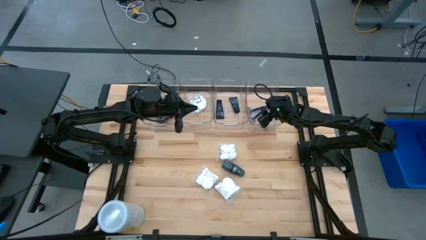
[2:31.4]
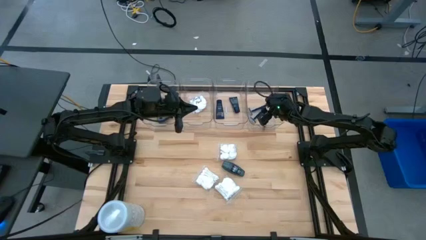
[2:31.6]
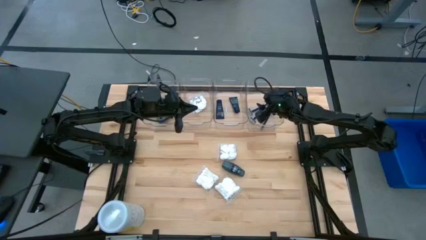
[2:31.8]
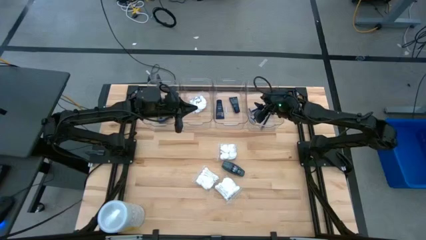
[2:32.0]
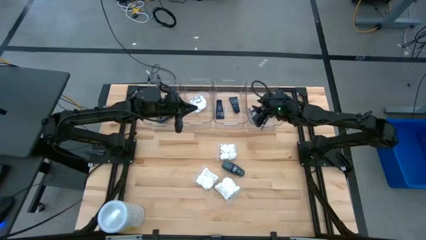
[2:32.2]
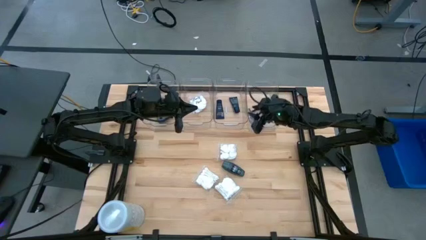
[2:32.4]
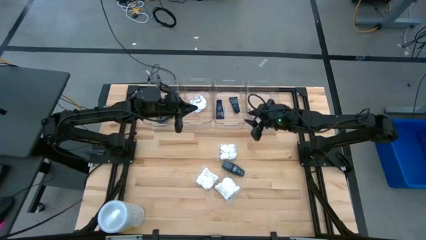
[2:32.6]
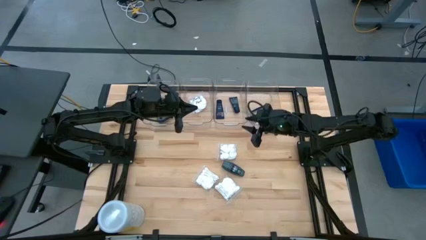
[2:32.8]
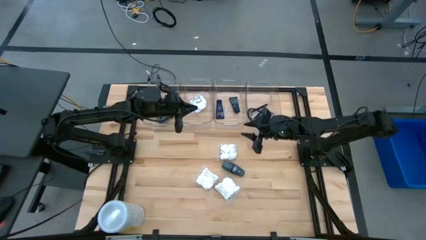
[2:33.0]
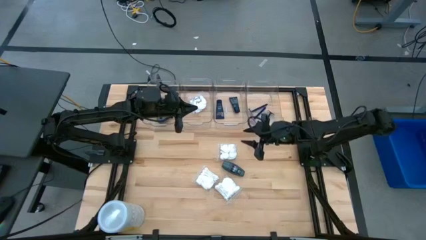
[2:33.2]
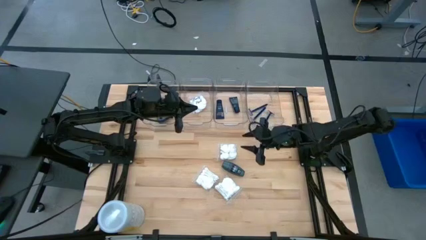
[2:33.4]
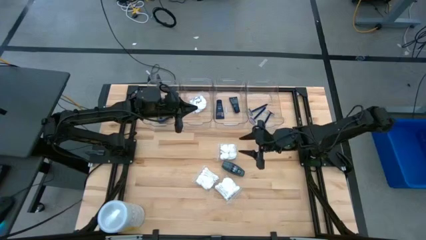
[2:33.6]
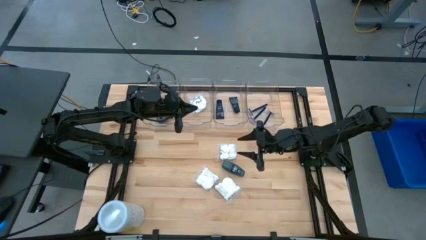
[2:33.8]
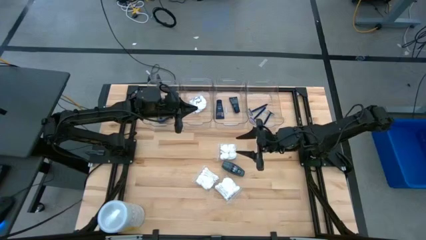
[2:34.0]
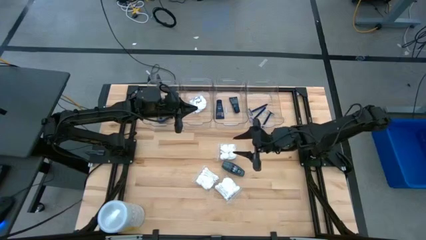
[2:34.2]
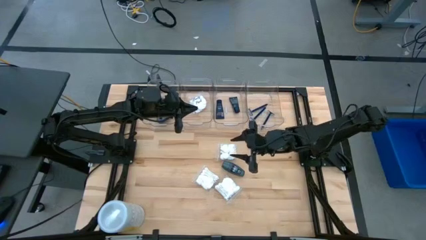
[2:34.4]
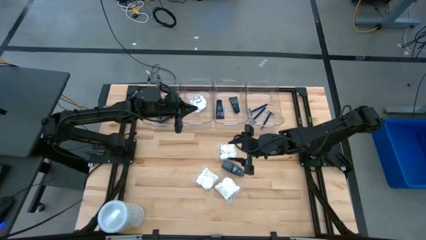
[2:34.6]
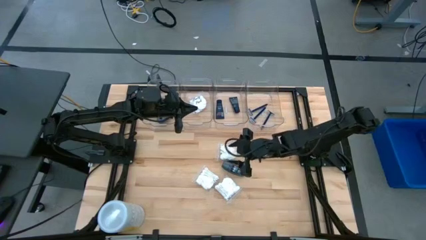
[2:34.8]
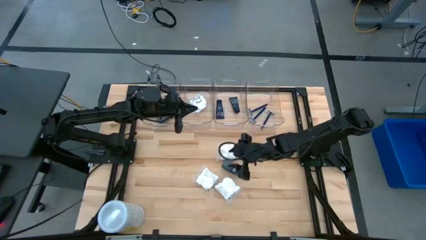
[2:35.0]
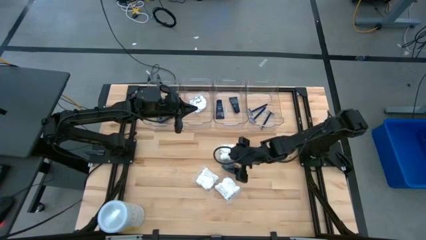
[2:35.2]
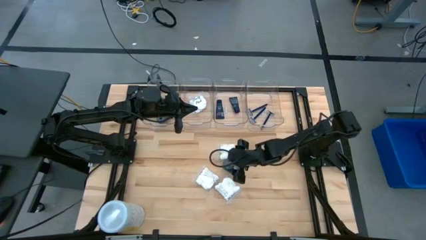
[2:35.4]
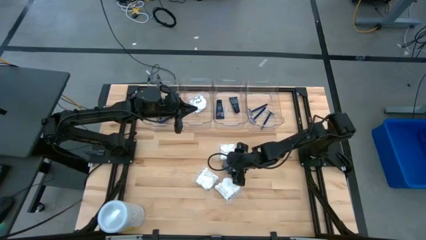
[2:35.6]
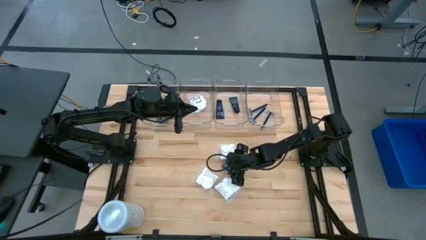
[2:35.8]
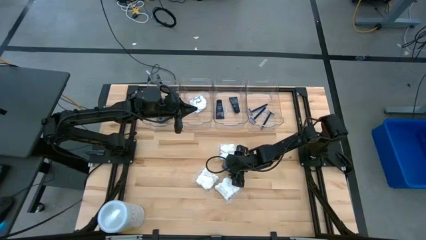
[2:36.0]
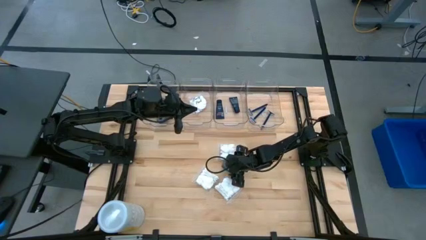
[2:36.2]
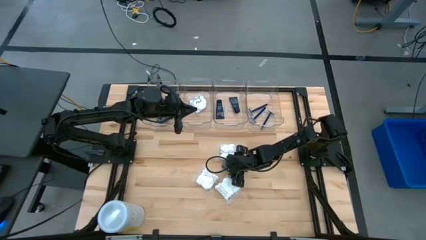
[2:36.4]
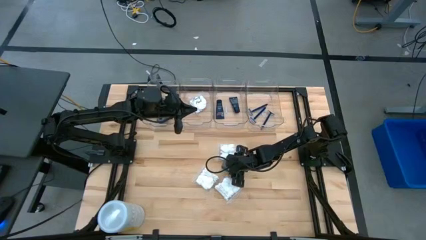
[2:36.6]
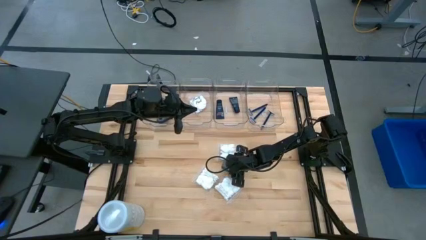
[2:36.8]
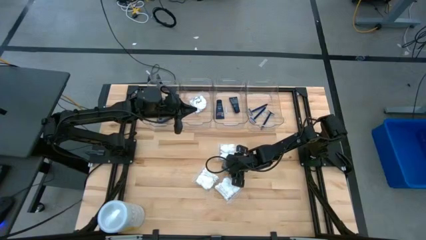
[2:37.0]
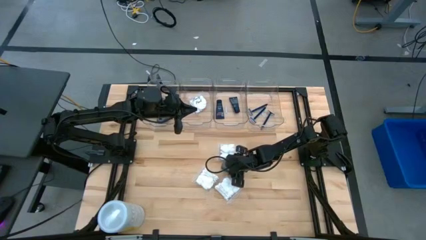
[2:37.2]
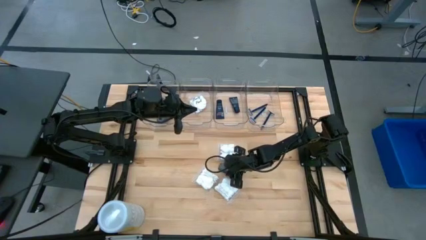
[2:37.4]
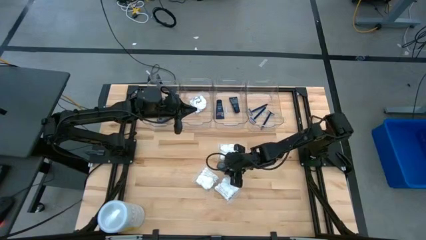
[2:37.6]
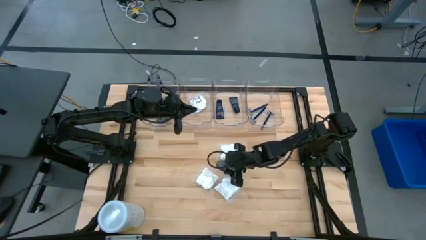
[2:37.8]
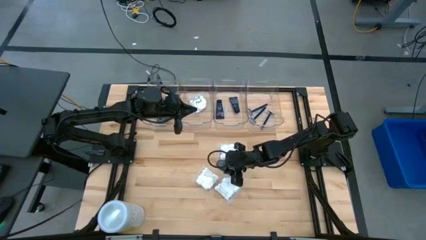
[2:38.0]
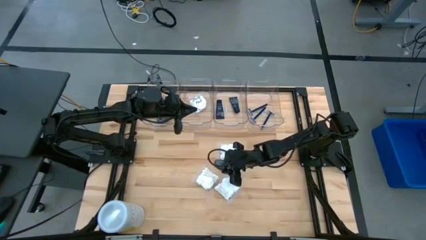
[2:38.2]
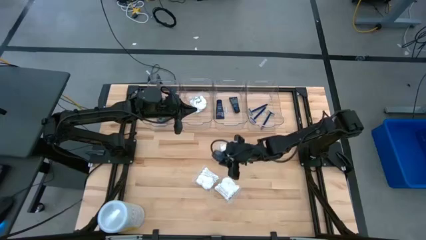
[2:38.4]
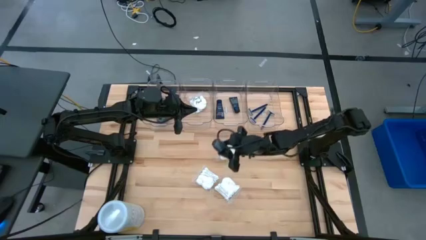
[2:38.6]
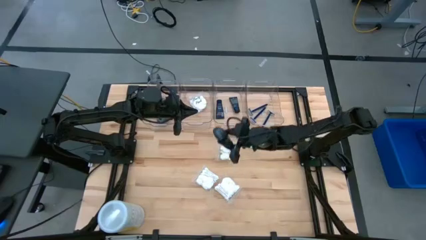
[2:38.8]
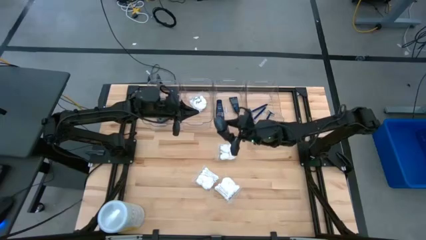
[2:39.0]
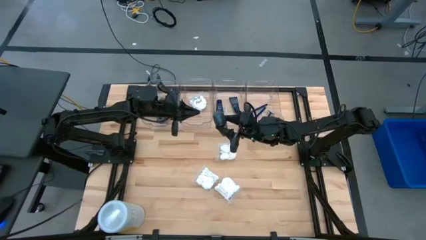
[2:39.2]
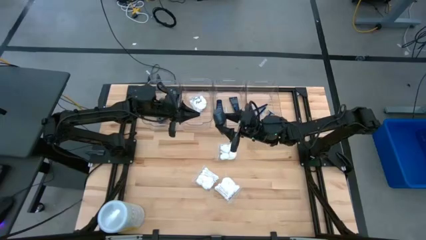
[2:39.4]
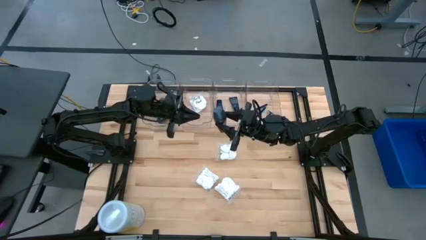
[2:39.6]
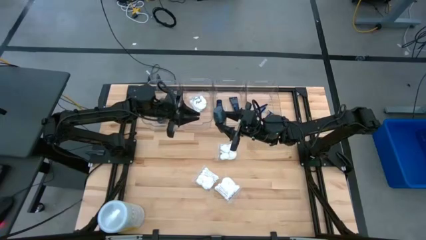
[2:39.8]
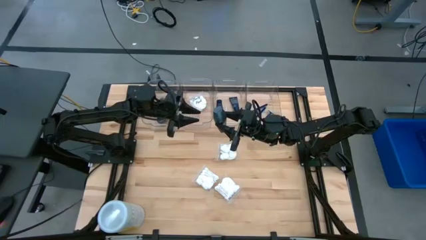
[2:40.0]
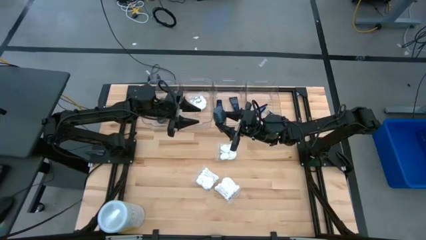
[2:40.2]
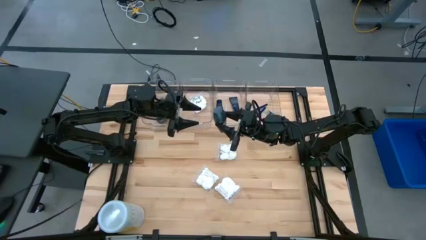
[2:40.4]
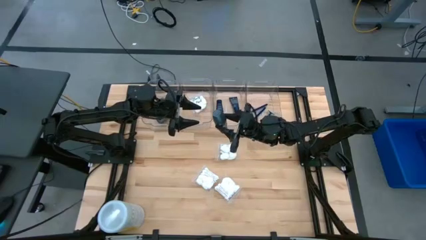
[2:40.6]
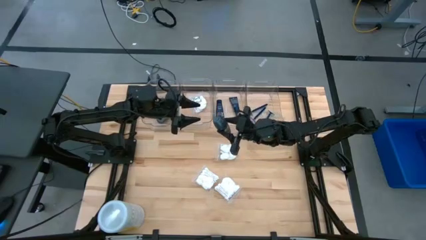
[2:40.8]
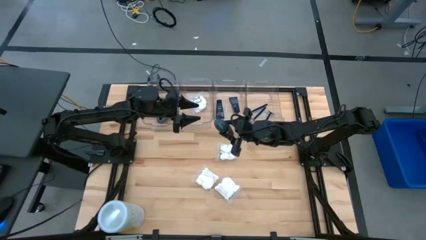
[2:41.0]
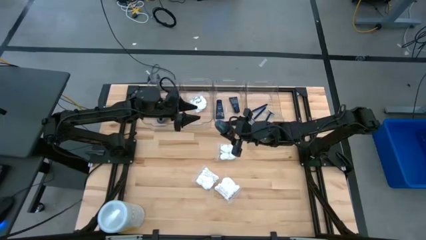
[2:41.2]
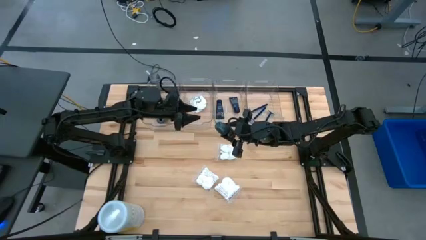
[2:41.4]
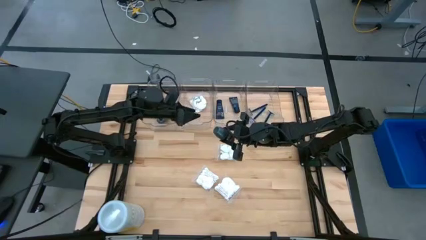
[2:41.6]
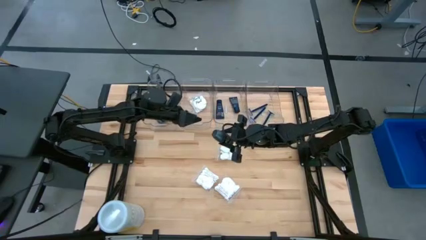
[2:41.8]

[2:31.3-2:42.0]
Task: Pick & Place Travel size toiletries
Put the gray deodorant into the left transparent bin

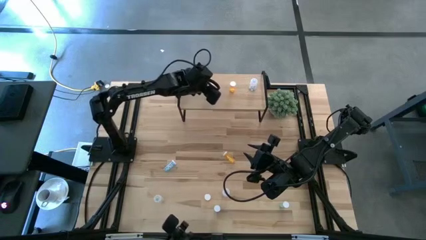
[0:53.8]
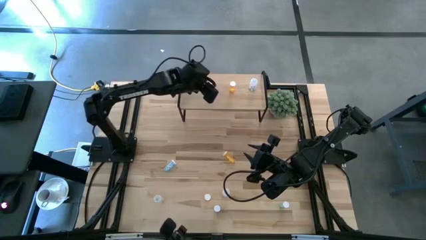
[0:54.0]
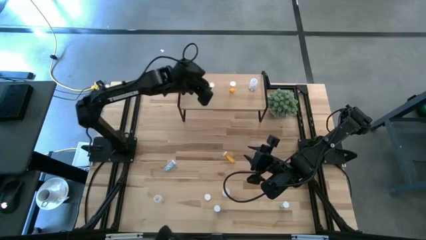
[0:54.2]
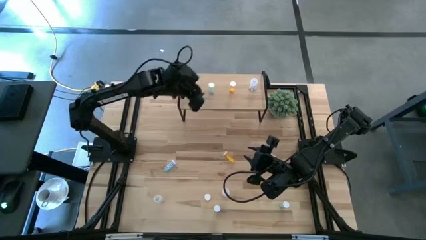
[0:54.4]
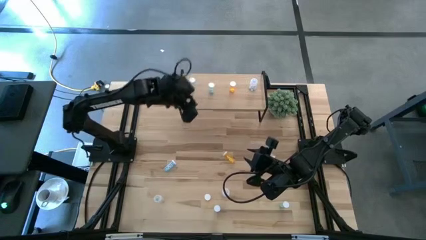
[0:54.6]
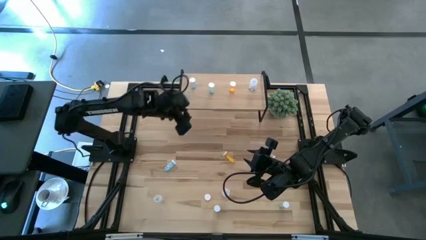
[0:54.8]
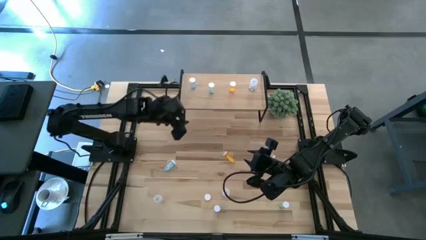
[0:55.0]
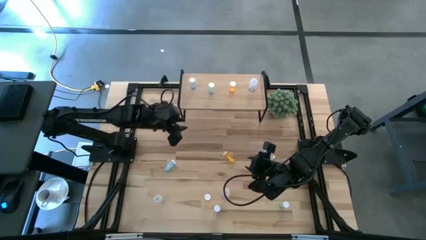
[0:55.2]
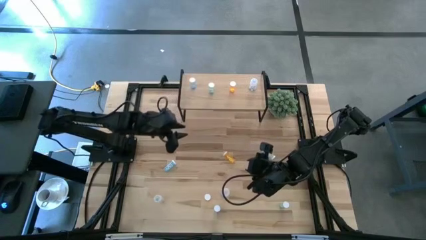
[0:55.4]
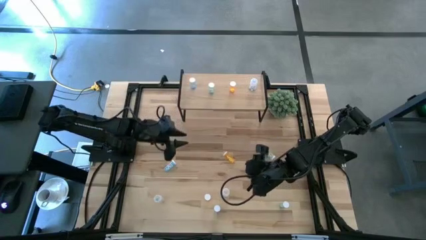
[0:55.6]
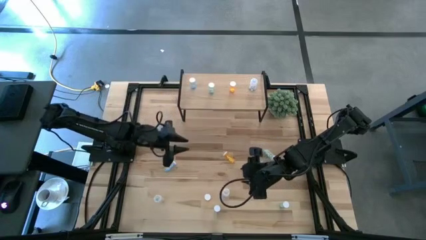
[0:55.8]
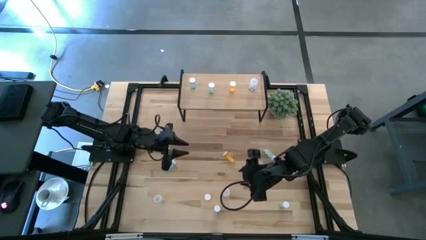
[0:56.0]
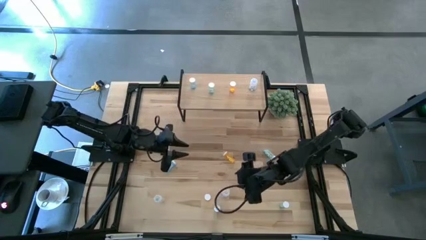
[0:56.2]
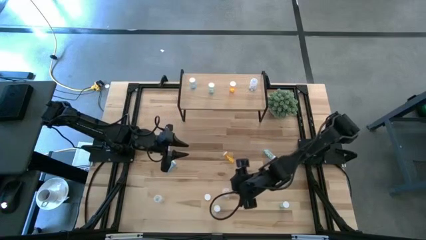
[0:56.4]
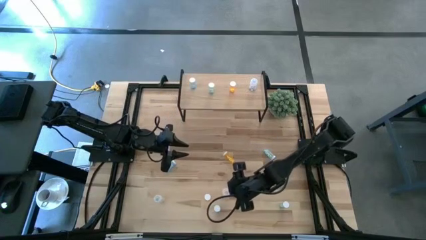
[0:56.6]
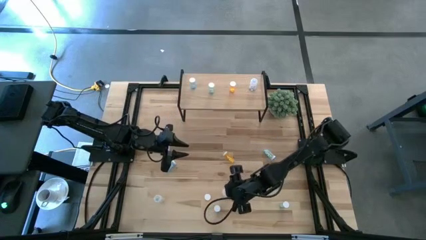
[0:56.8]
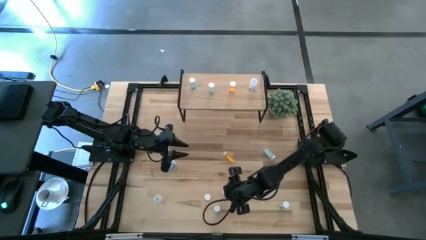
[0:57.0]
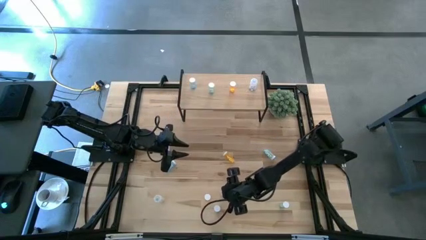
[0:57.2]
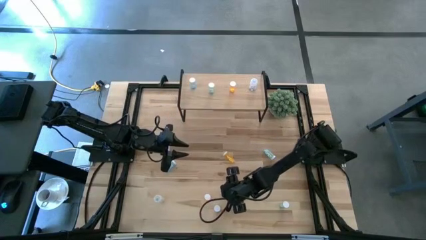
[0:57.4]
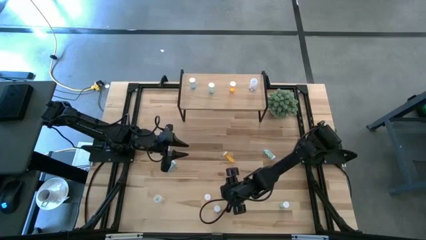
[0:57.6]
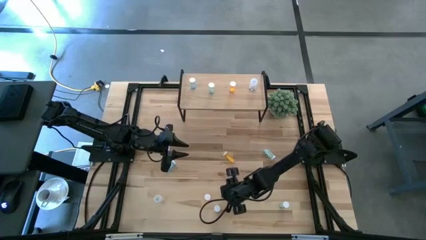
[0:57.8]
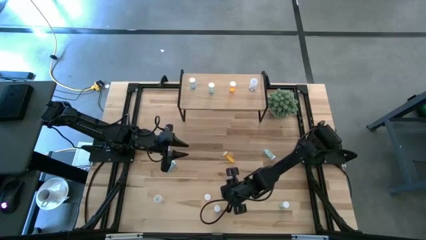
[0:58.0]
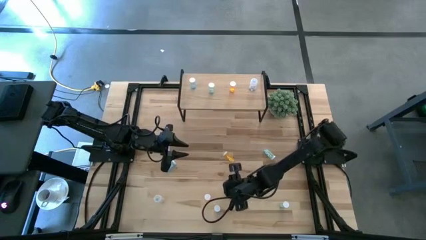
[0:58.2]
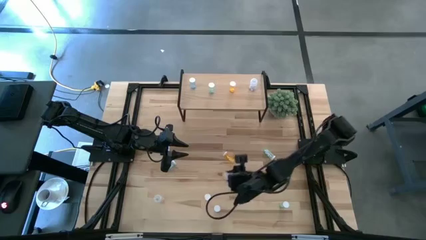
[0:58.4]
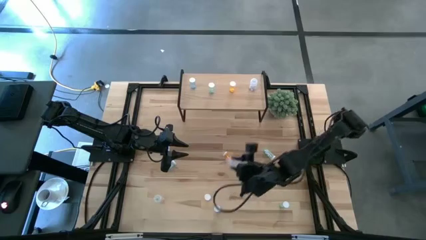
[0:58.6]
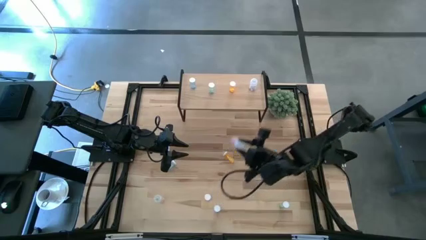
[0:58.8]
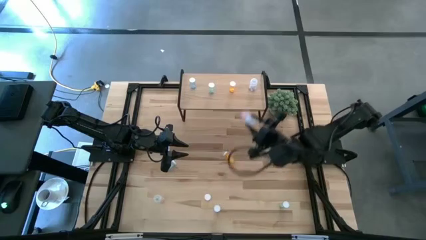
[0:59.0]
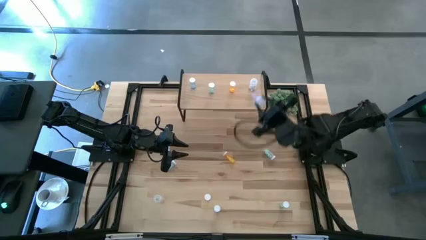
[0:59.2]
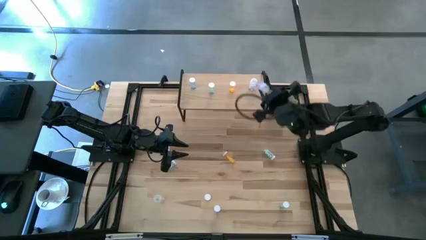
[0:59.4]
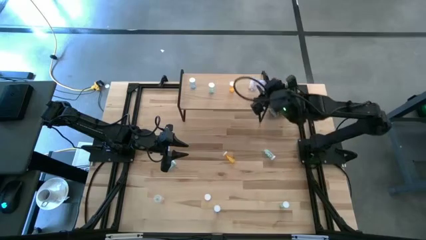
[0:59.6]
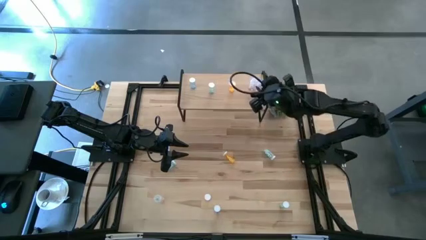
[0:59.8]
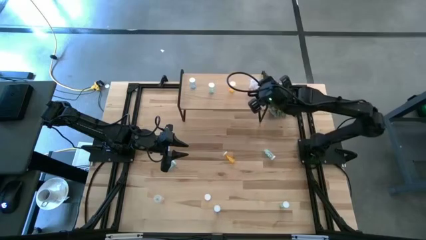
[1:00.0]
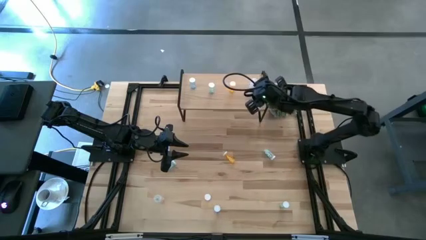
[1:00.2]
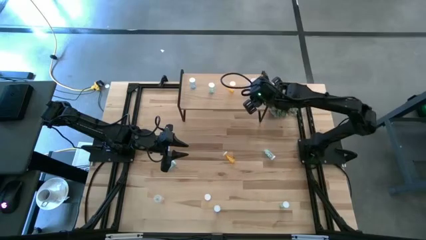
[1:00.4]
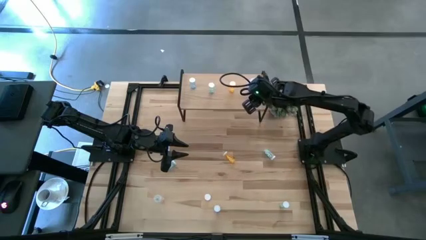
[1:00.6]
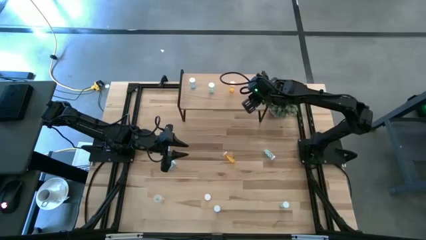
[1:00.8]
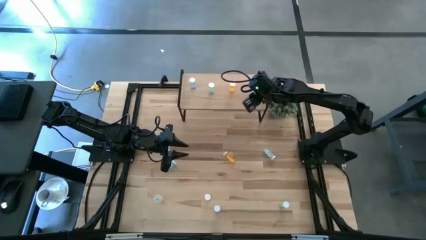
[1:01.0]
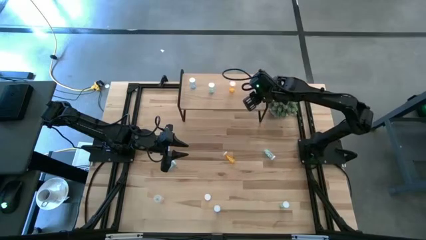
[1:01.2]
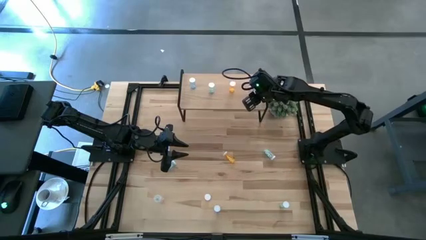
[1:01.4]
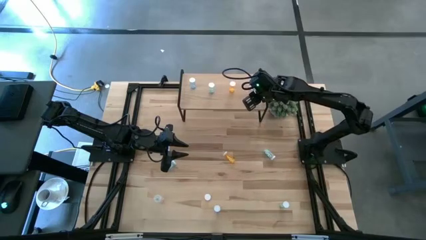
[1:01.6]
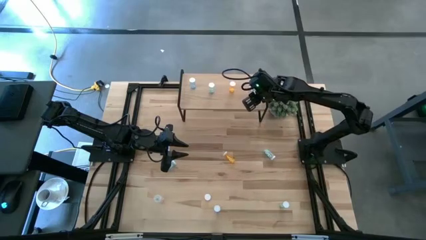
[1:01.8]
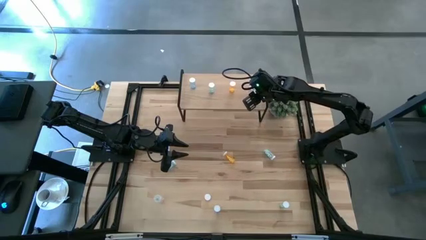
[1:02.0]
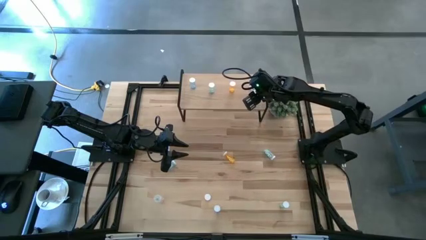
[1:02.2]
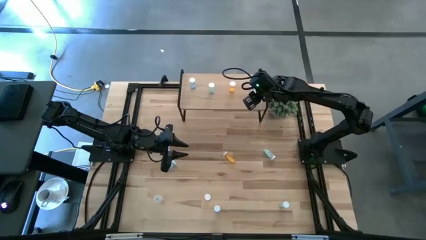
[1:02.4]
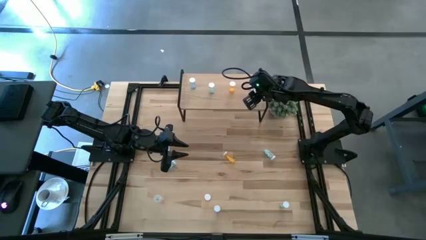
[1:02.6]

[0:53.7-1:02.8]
Task: Pick and place medicine bottles onto shelf by color
Put the right transparent pill bottle on the shelf aligned with the other transparent pill bottle
